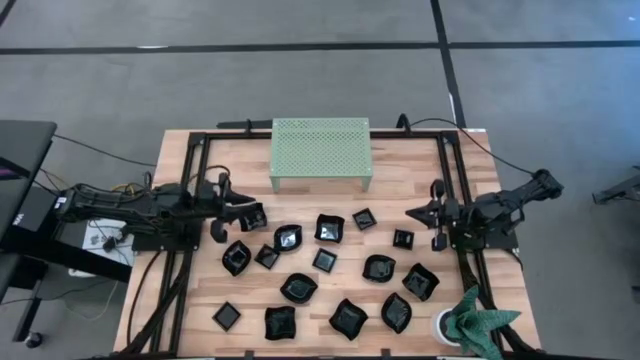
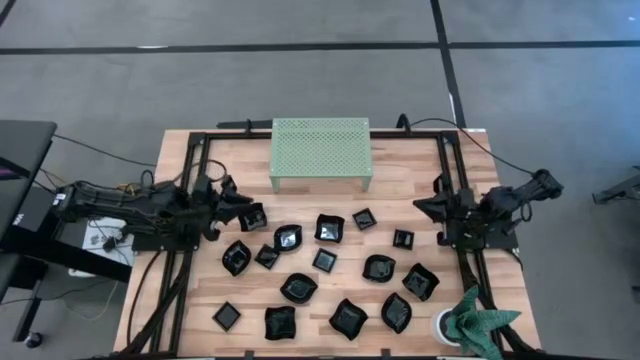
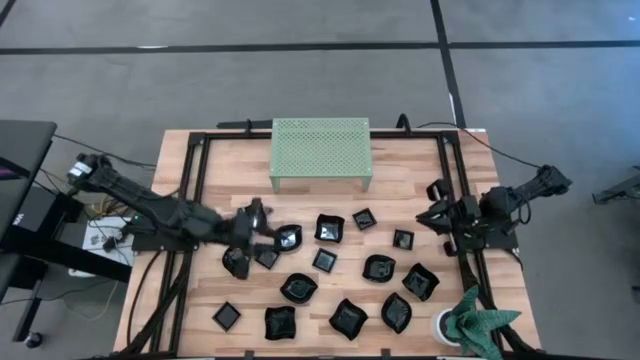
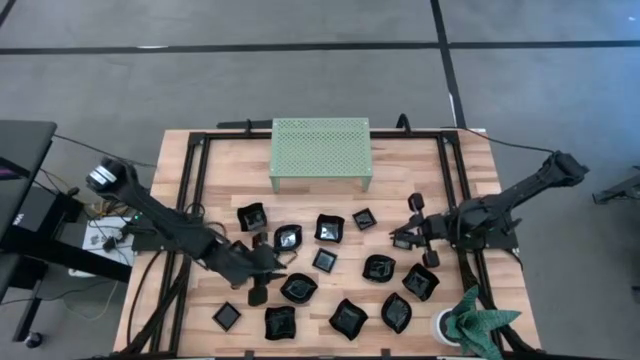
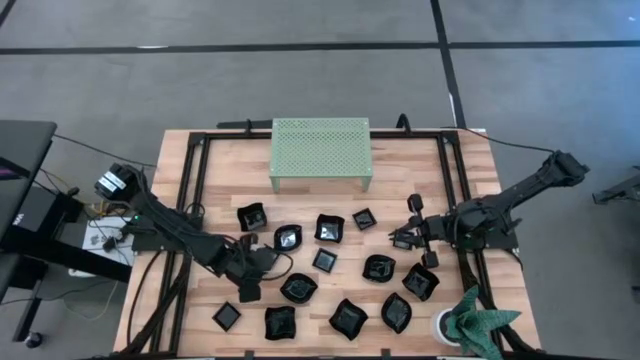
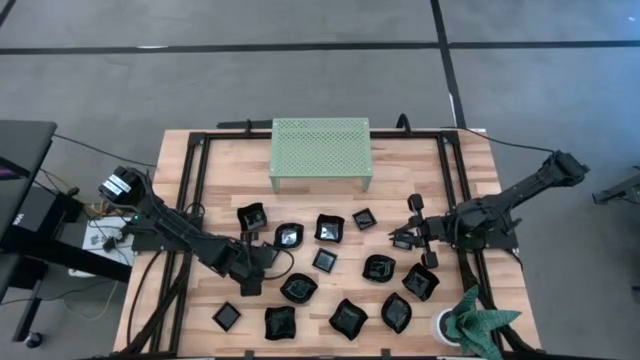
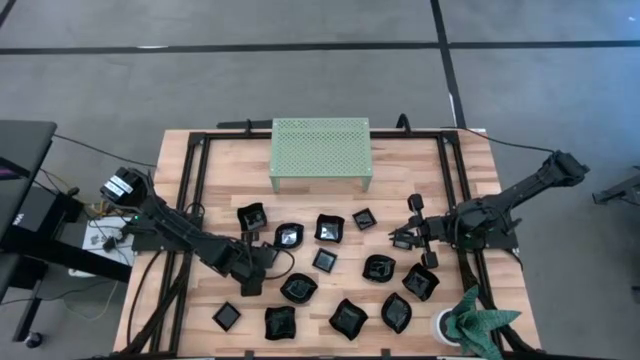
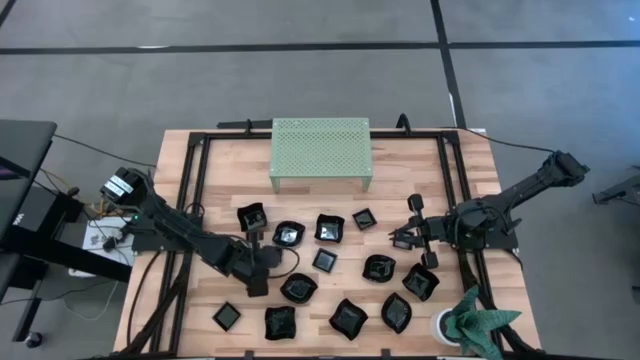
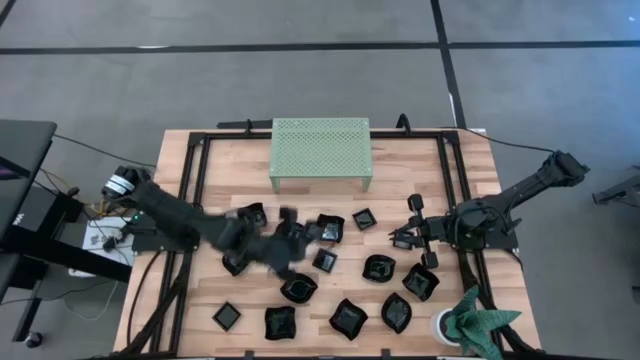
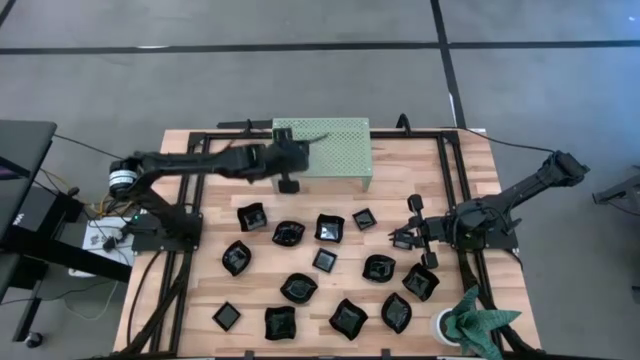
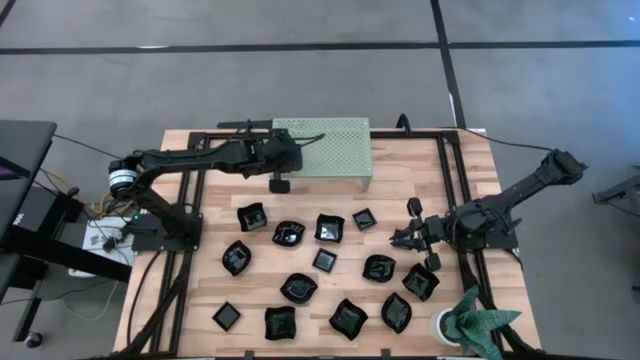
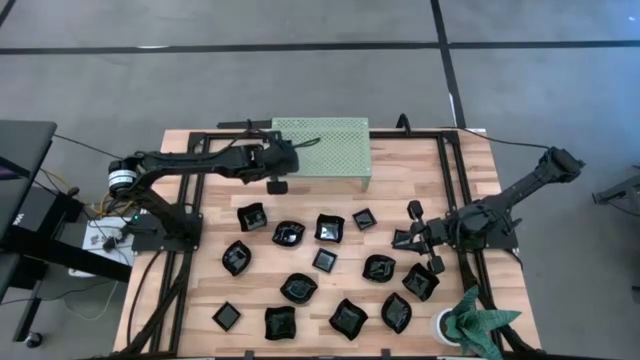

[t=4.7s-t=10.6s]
Task: Pick & Place Mini shaped plates
Put the black square plate on the shelf

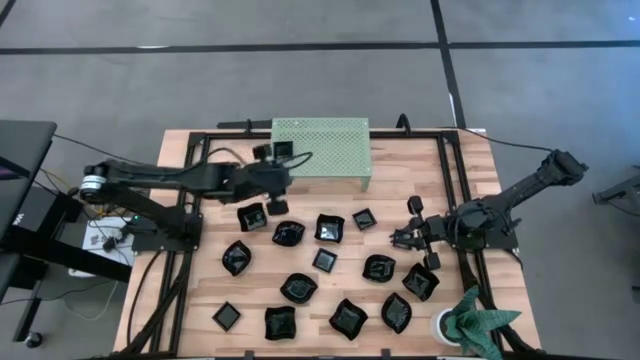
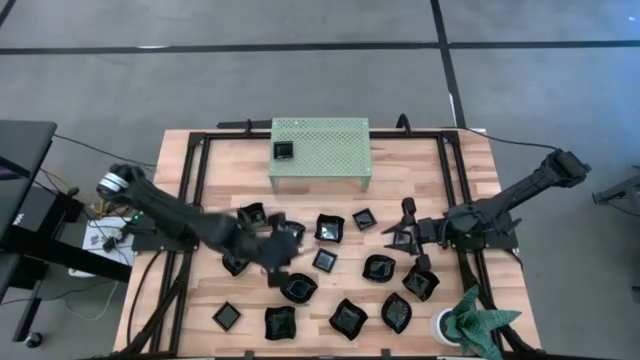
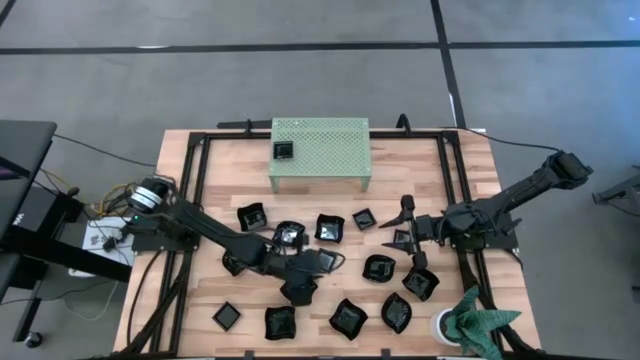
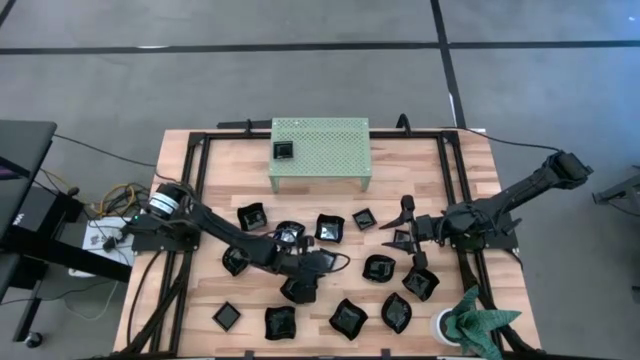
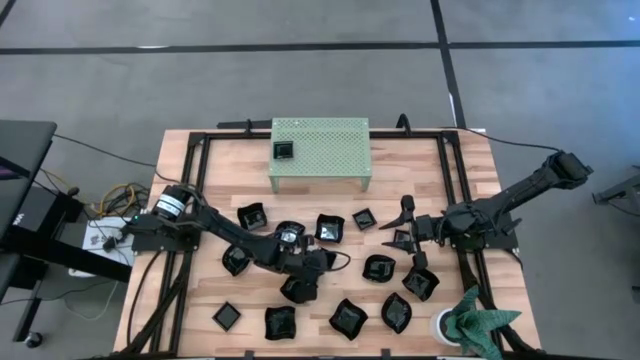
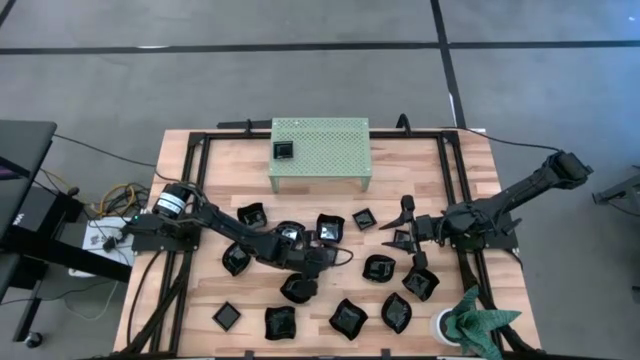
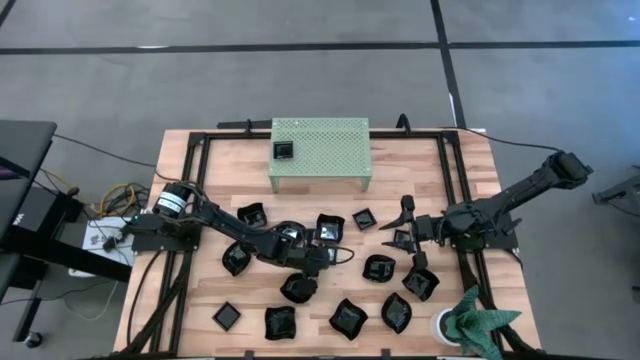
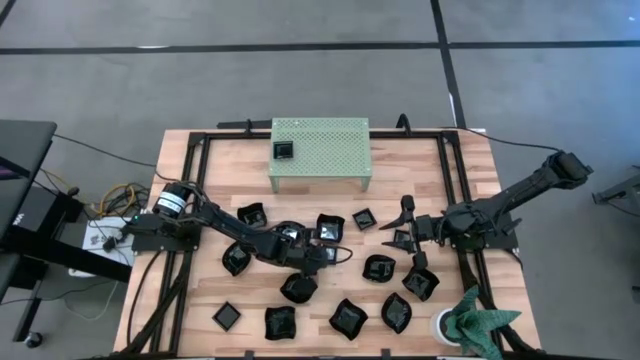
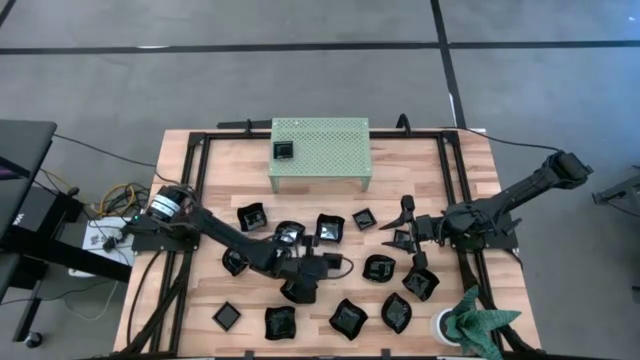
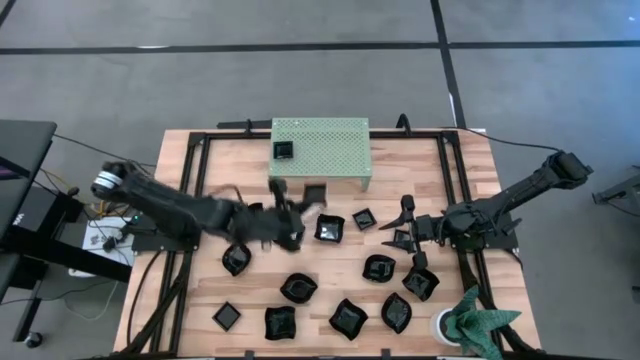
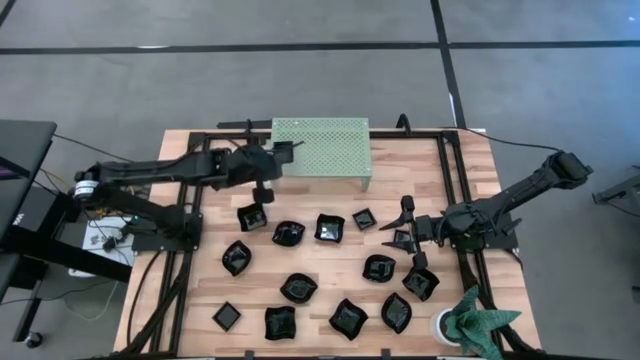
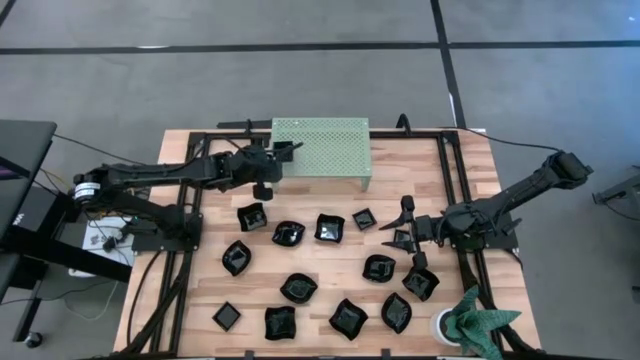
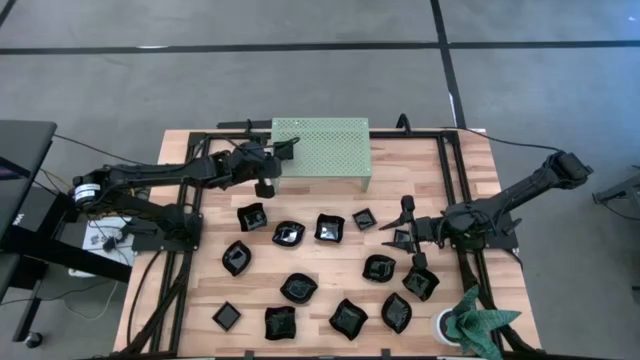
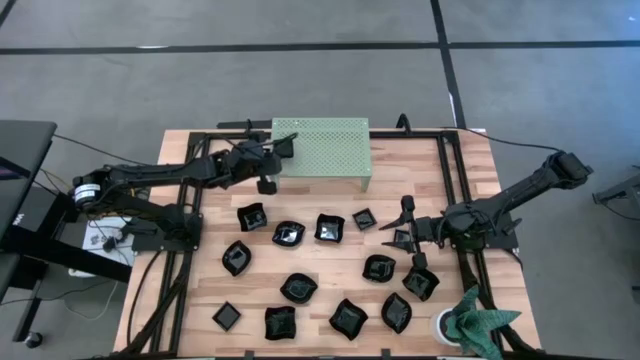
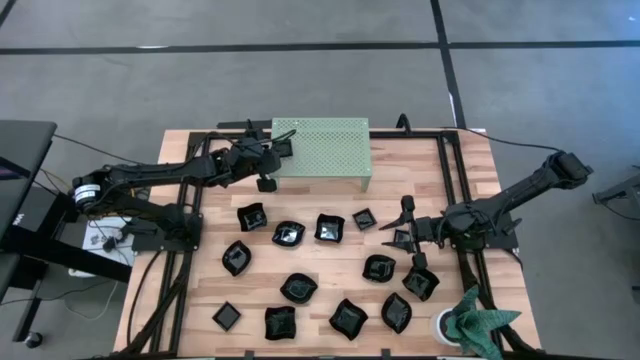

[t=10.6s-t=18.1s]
Stack the black square plate on top of the black square plate on the shelf

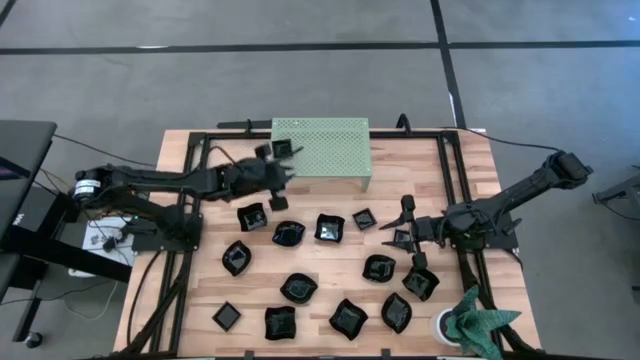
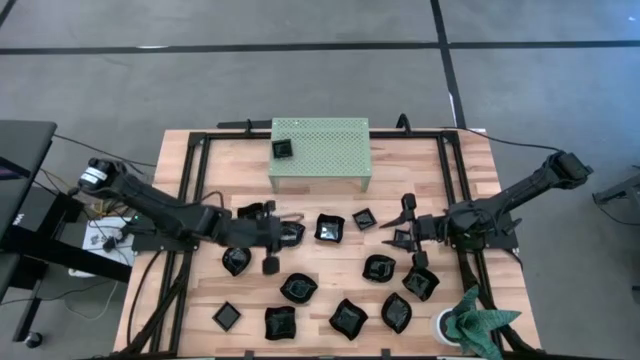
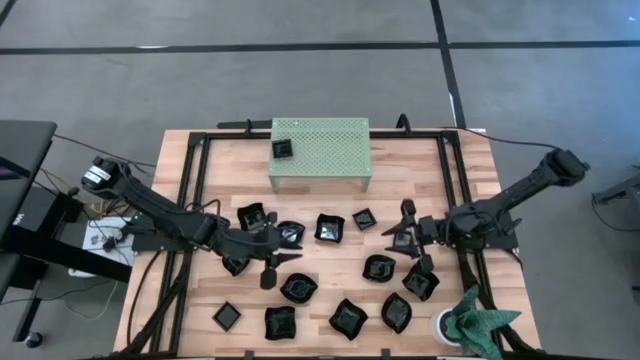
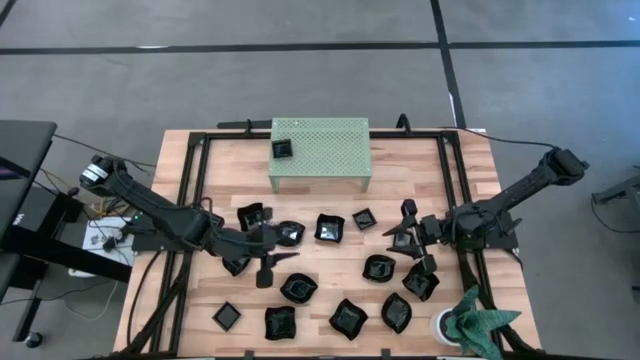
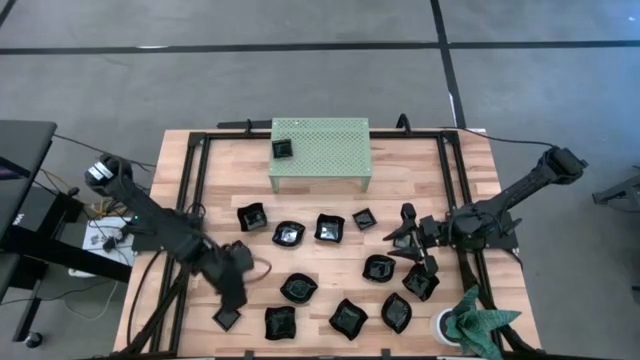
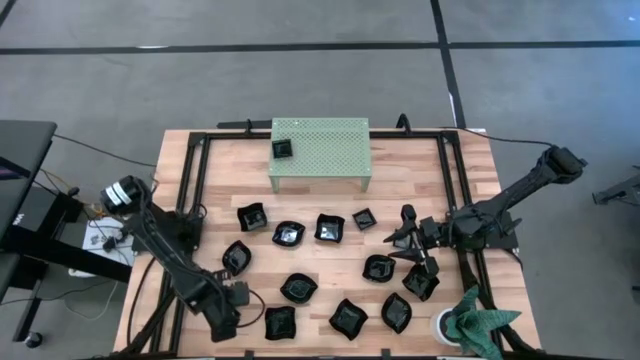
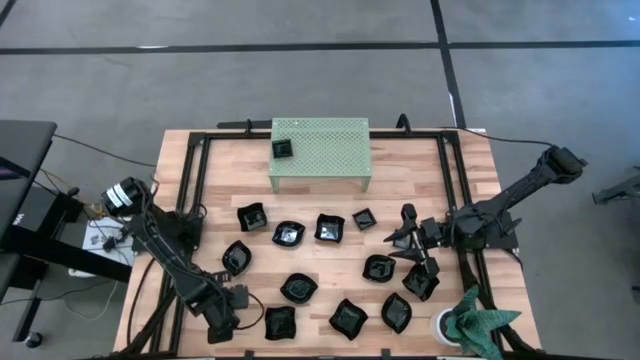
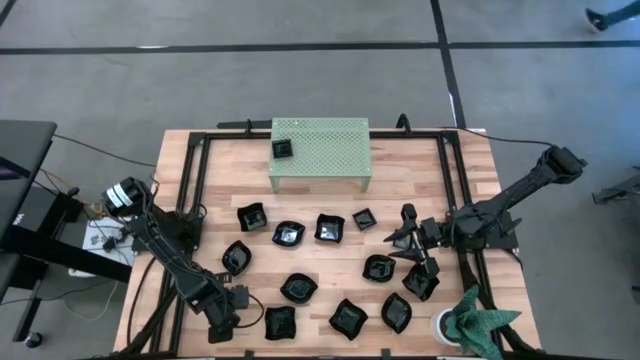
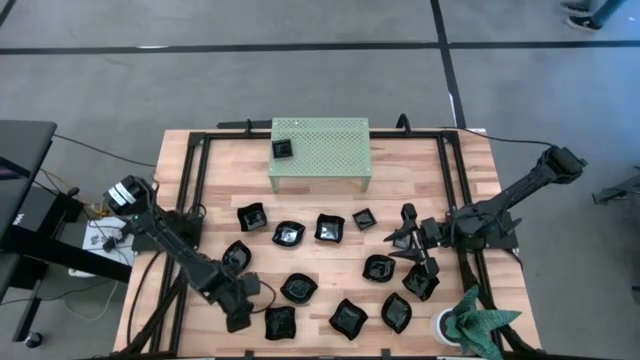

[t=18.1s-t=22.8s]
Stack the black square plate on top of the black square plate on the shelf

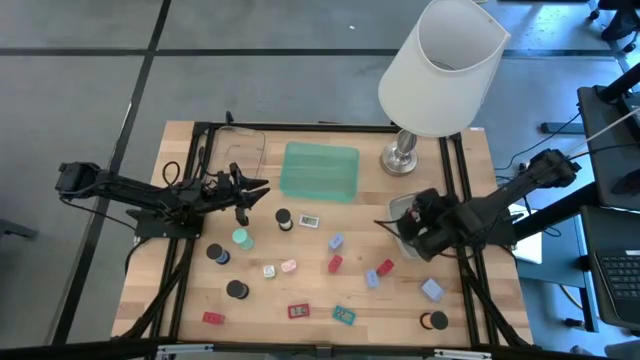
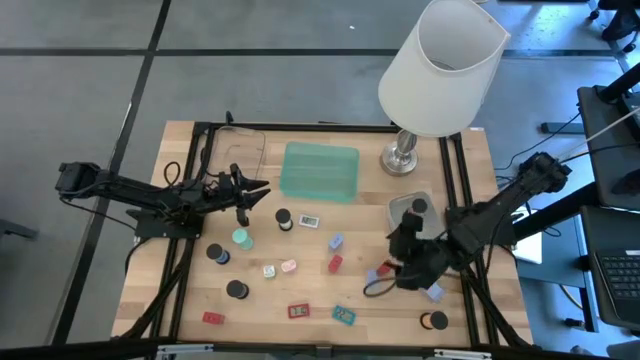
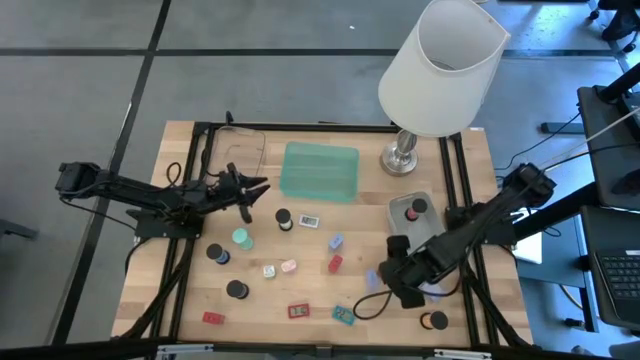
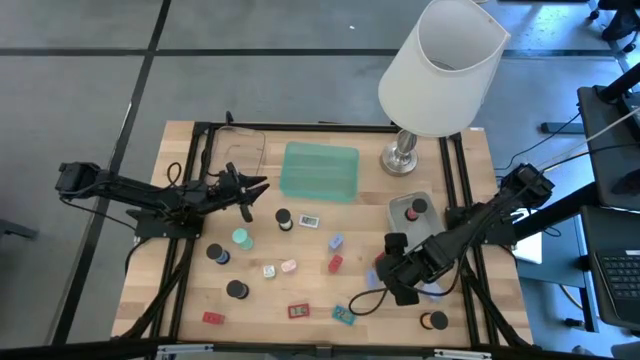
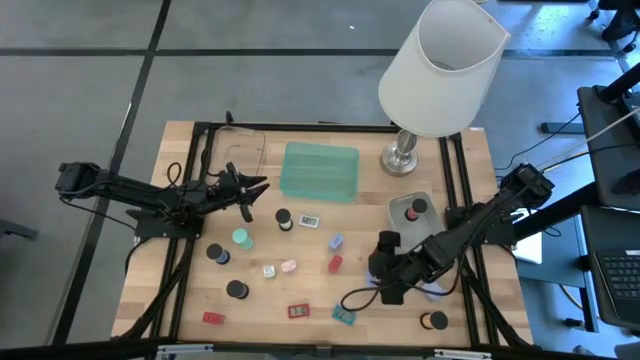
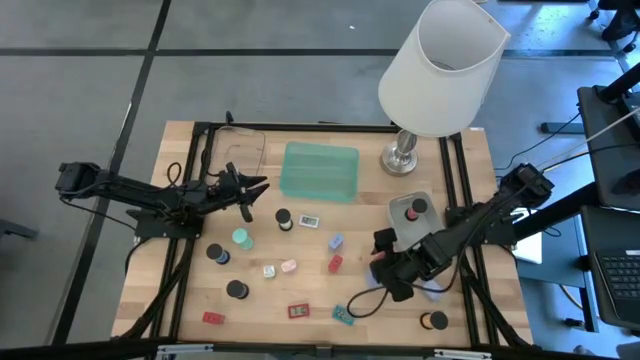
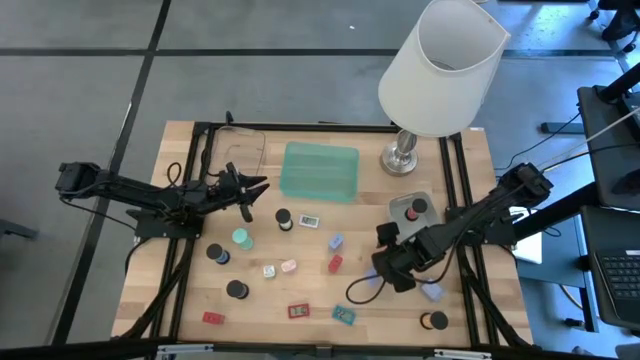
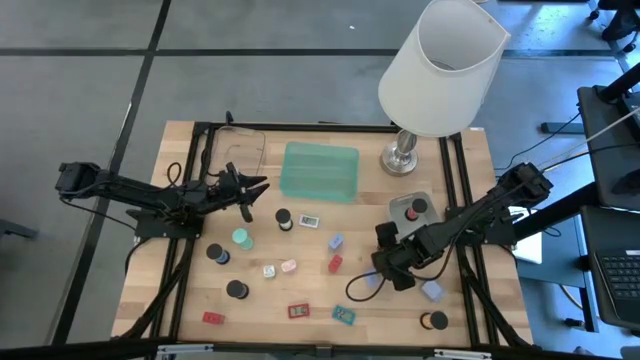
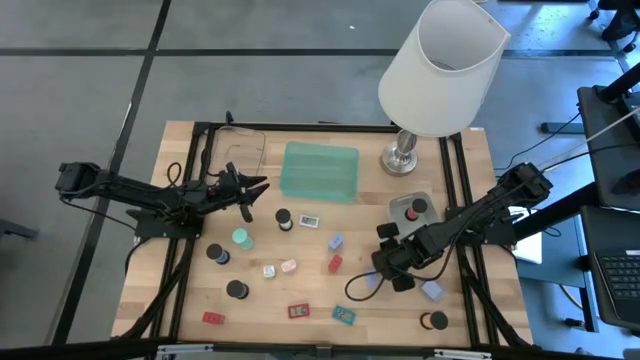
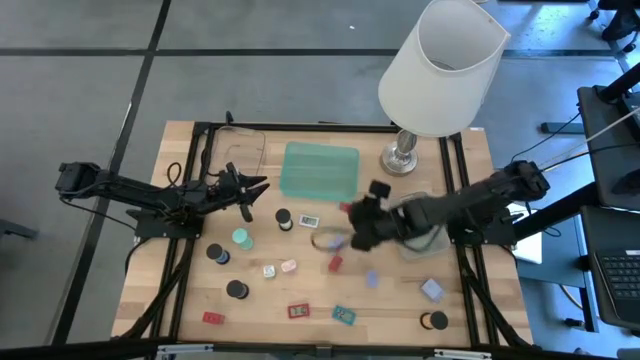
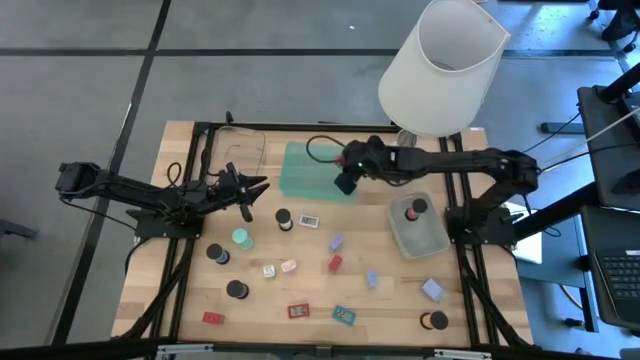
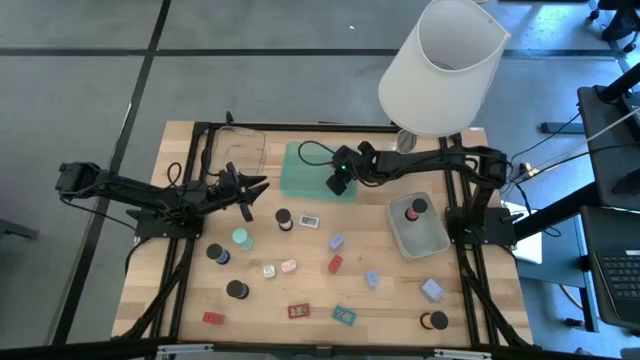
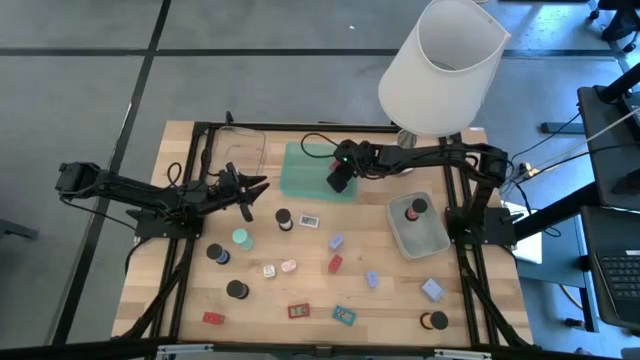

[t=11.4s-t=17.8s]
Task: Pick & Place Office items
Put the top right red charger adapter into the green bin
